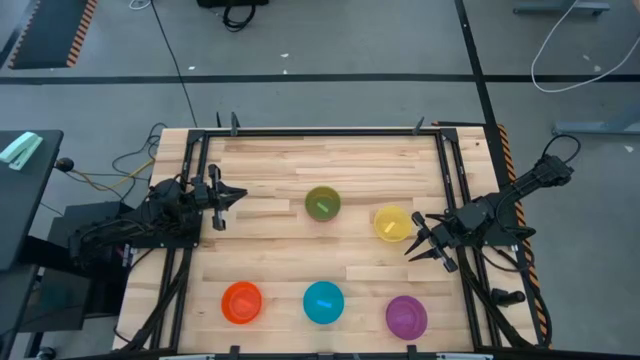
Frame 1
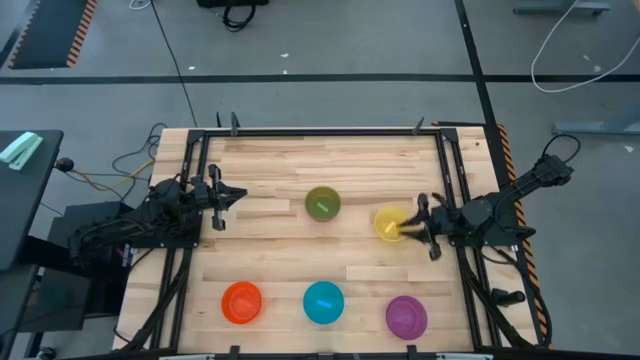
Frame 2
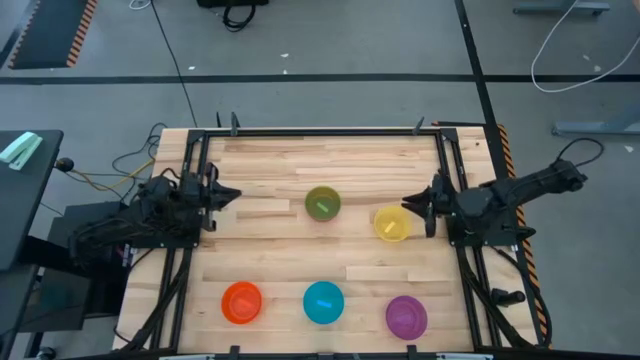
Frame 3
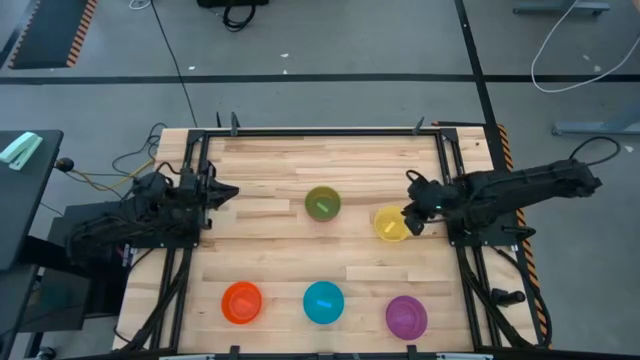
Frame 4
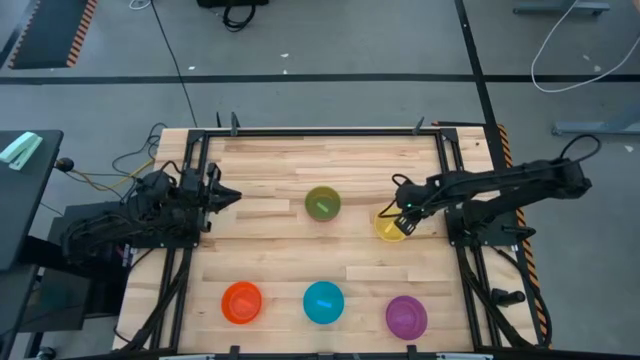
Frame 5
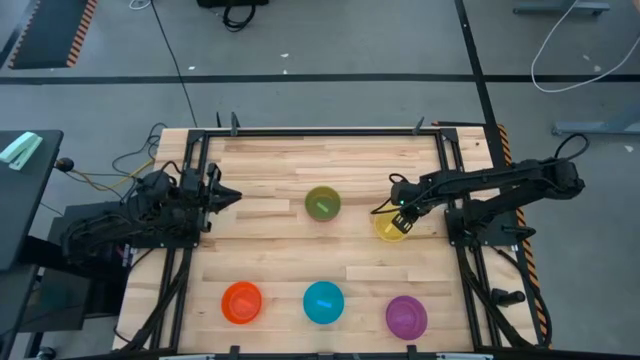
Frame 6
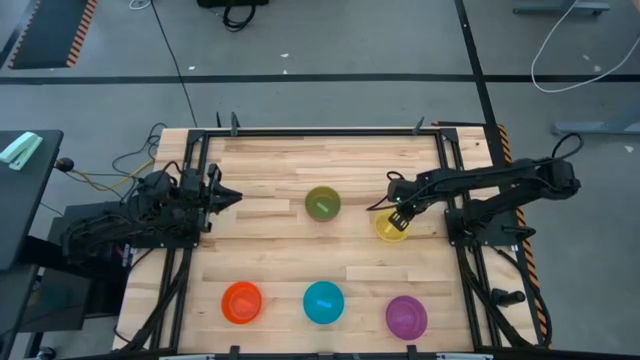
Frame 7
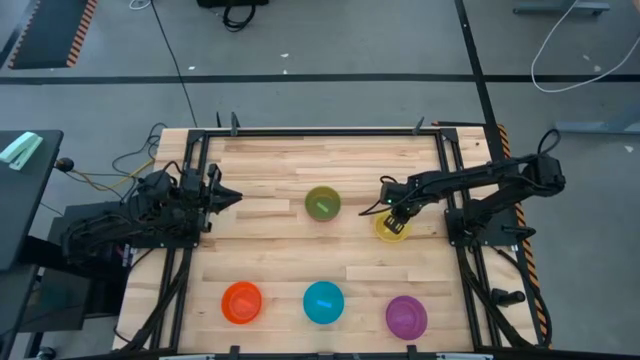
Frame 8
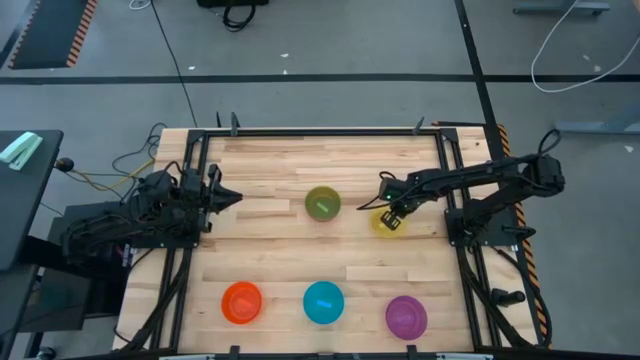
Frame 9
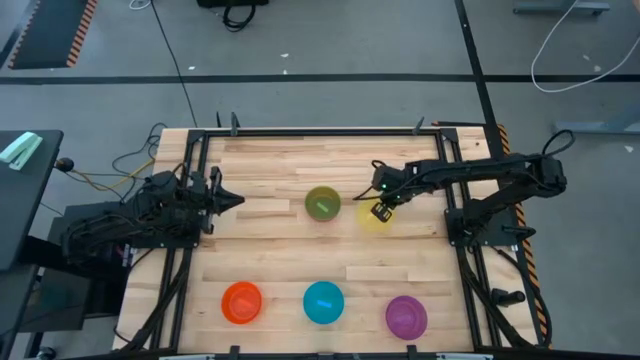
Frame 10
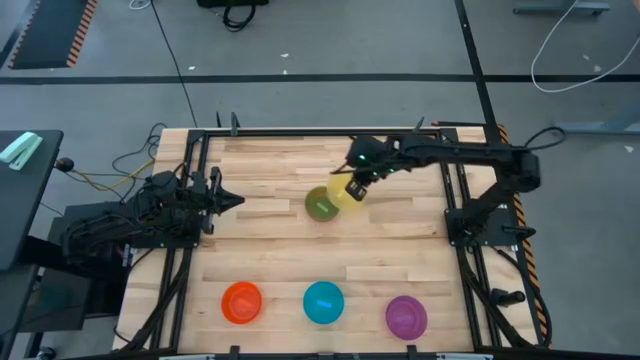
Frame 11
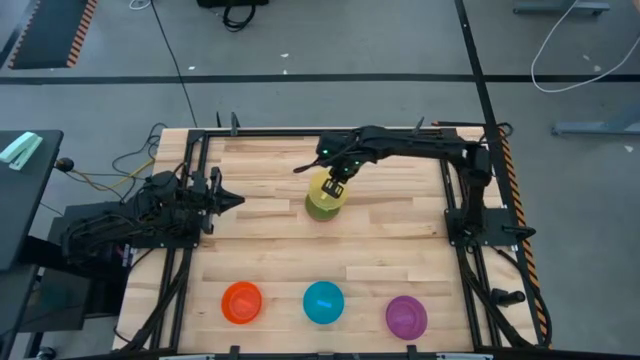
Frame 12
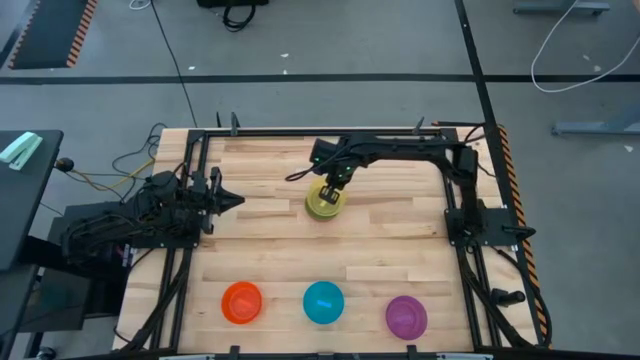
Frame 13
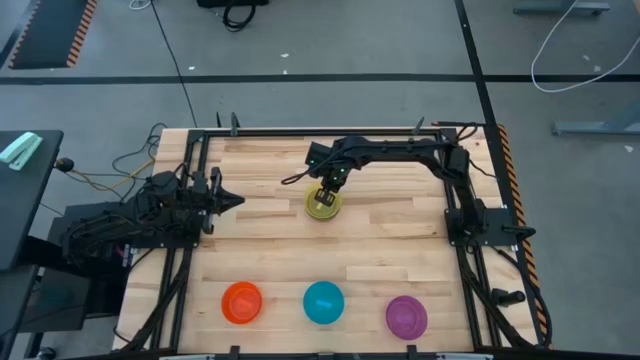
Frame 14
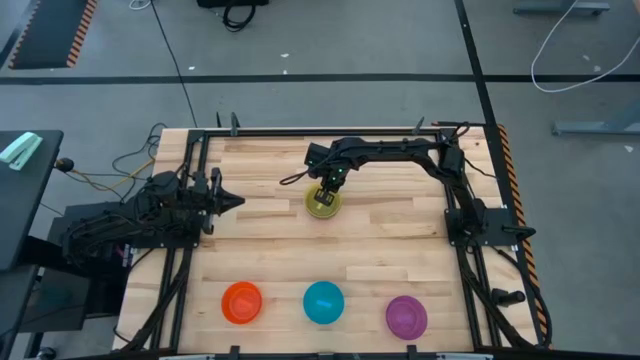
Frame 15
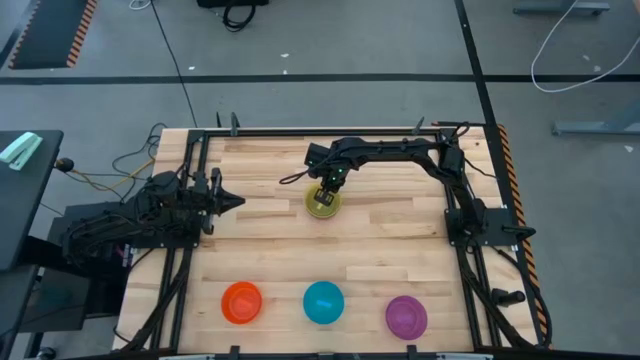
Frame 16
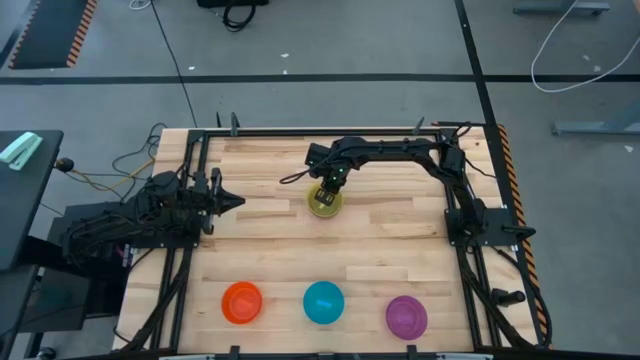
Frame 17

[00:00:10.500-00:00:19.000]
Task: Nest bowls inside each other
Stack the yellow bowl on top of the green bowl

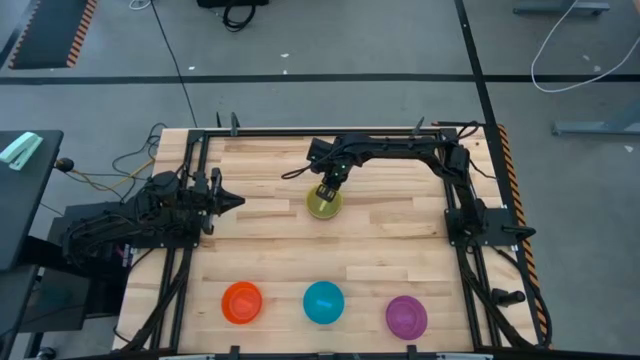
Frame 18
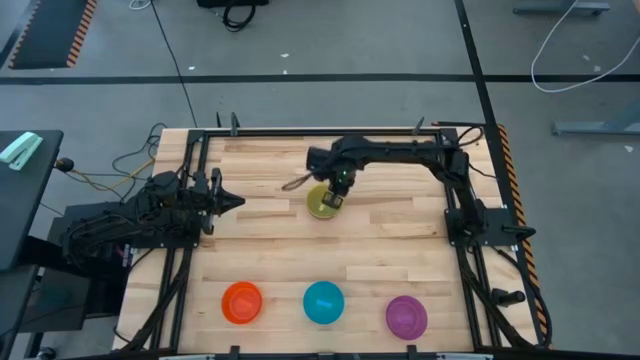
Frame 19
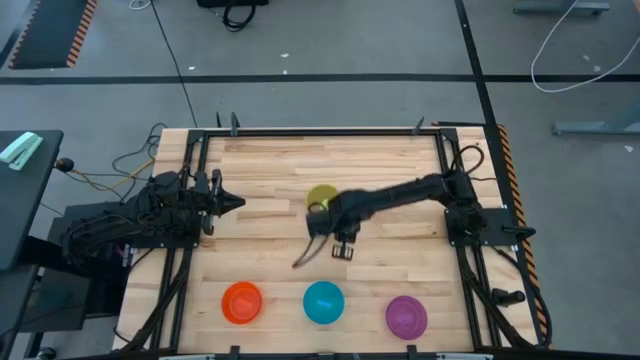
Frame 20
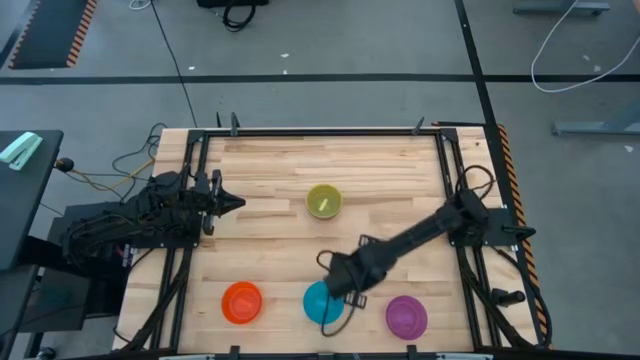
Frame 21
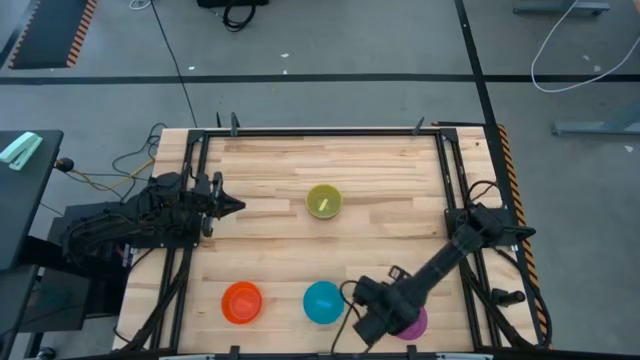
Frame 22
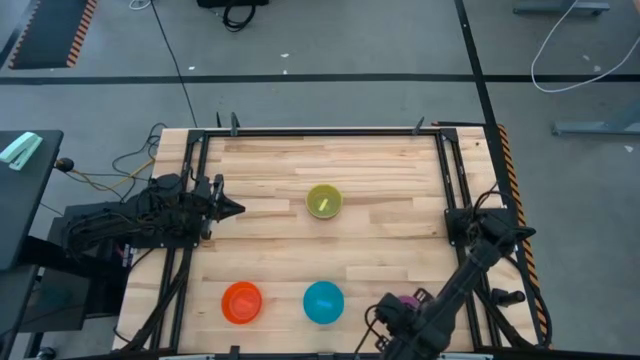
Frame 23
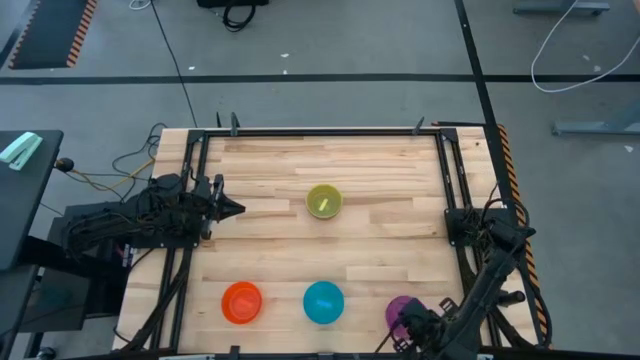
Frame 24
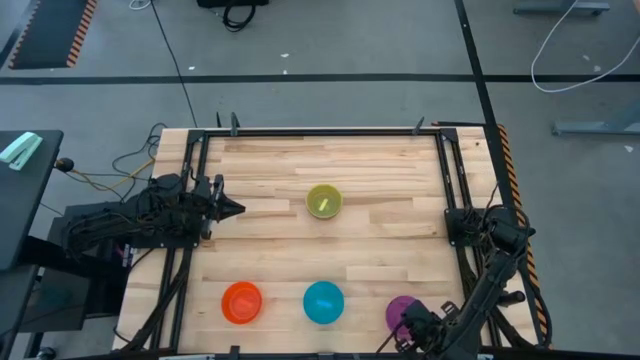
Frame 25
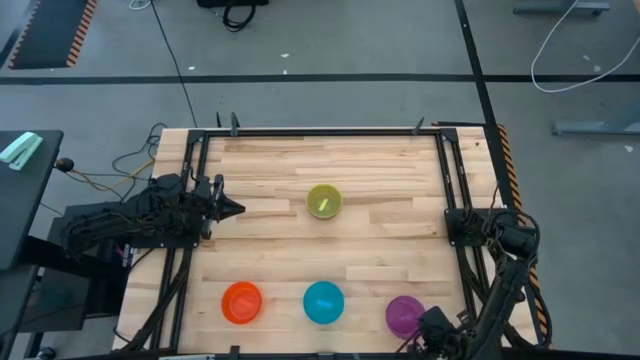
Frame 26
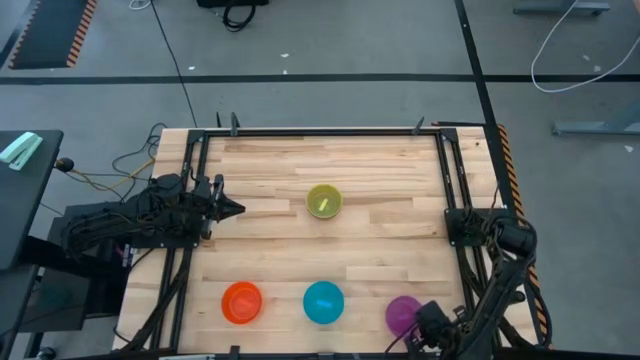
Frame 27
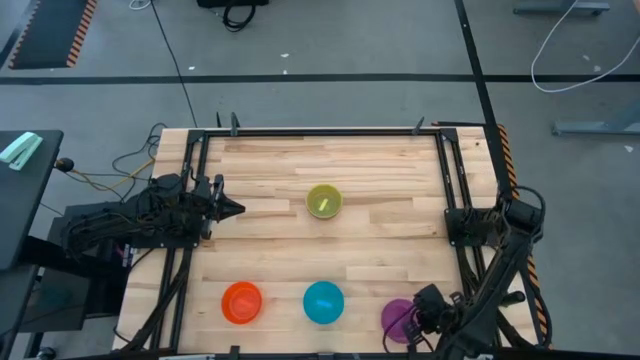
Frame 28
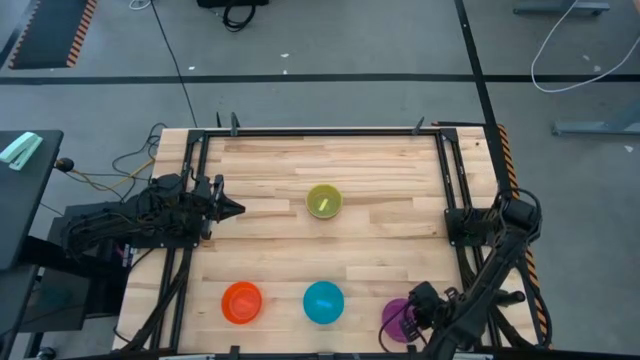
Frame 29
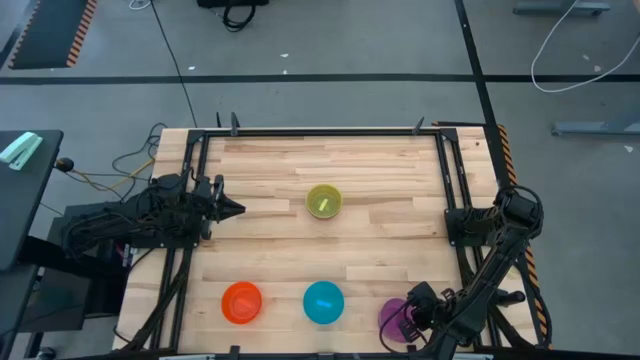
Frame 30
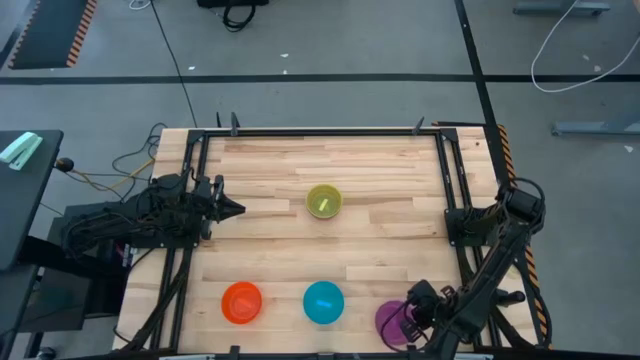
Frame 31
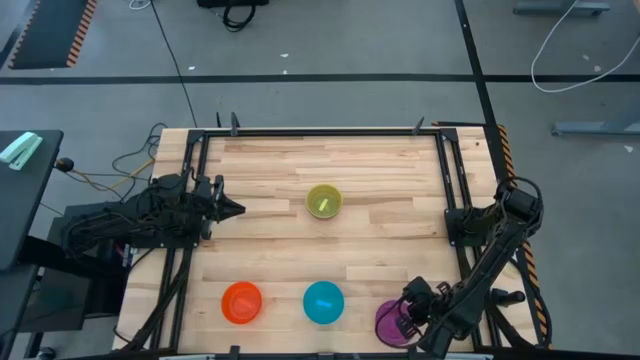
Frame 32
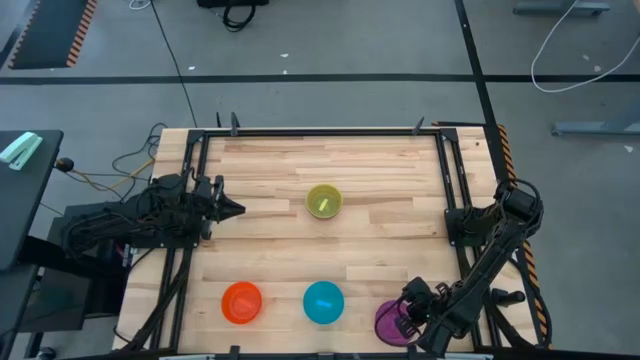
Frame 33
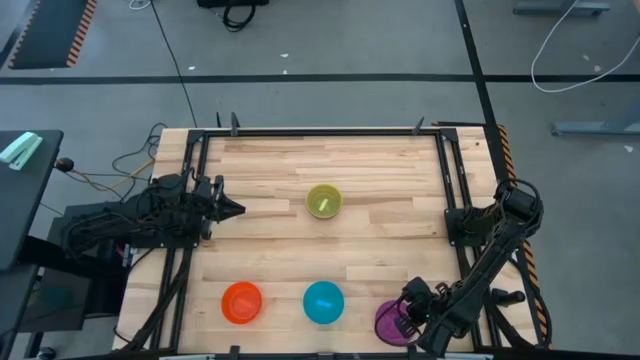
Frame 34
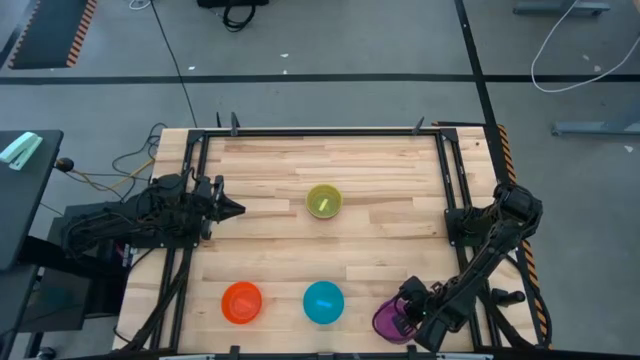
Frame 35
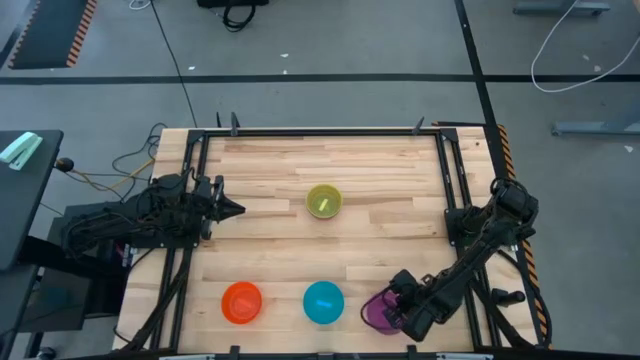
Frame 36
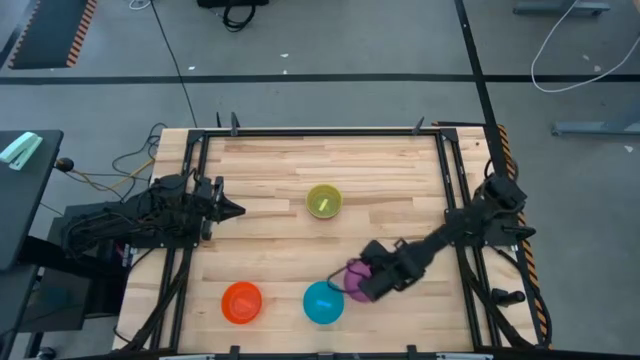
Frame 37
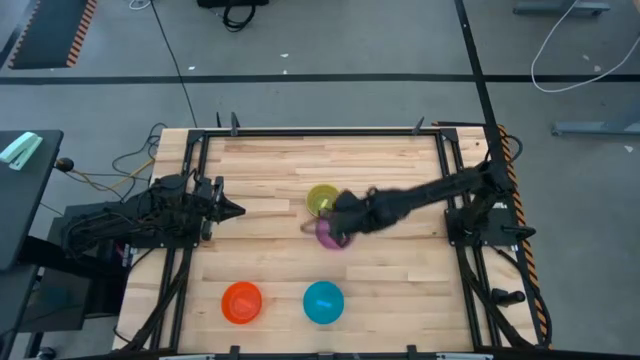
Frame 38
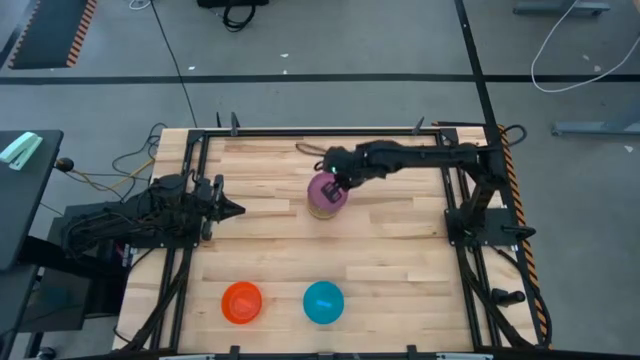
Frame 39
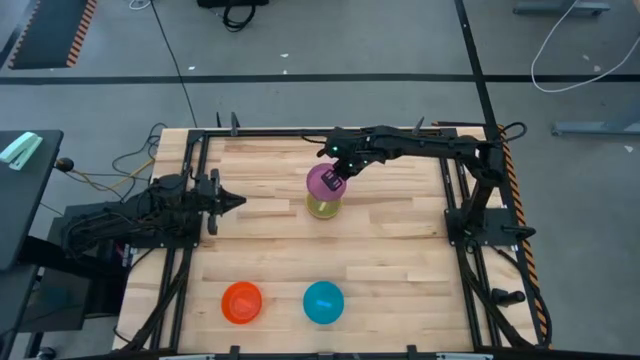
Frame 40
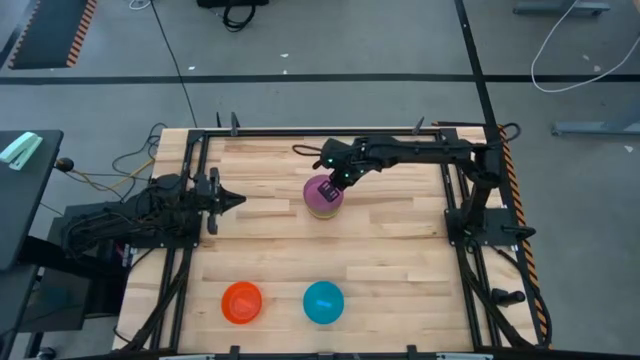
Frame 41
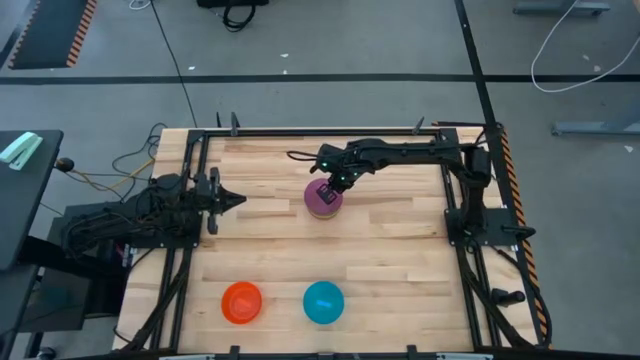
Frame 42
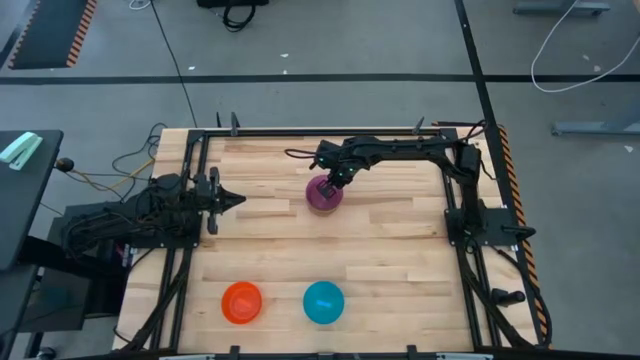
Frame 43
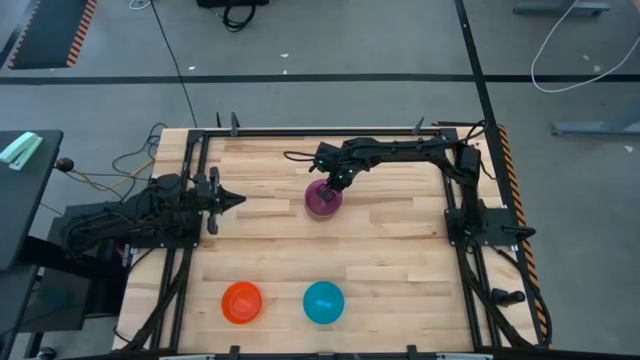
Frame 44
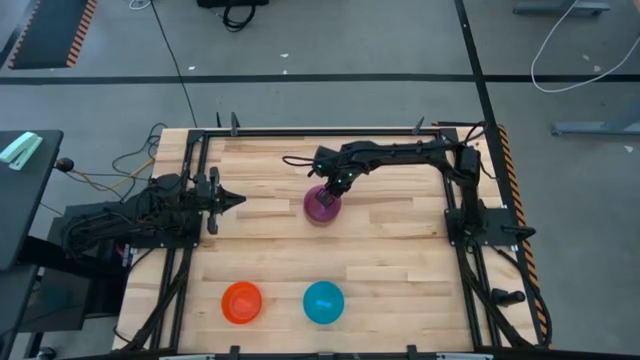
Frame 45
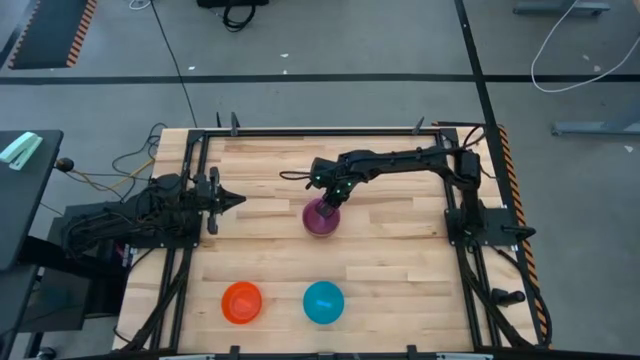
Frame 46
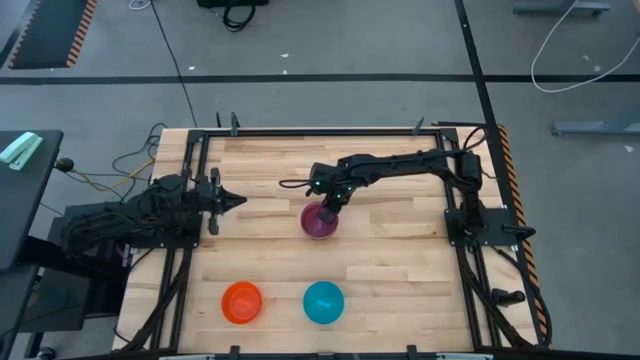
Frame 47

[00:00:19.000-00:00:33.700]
Stack the violet bowl on top of the yellow bowl
